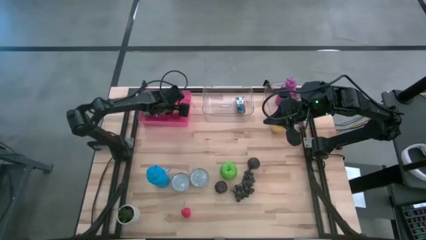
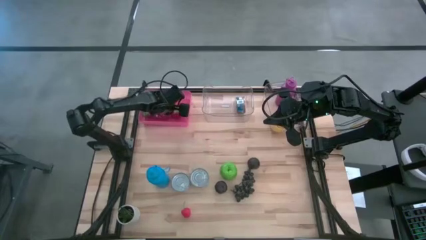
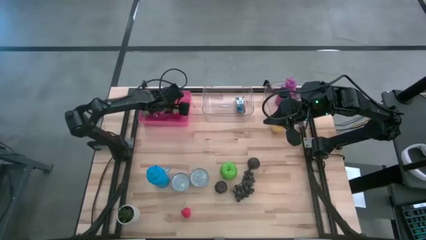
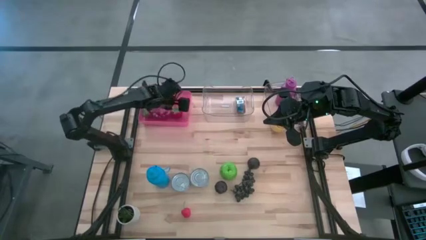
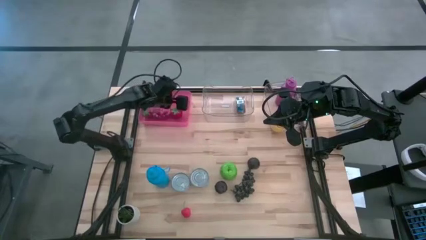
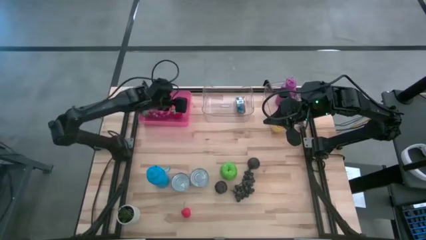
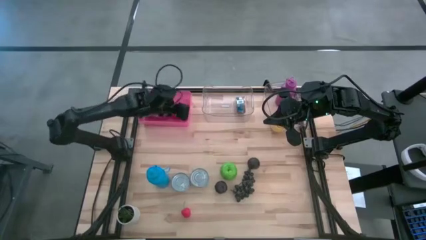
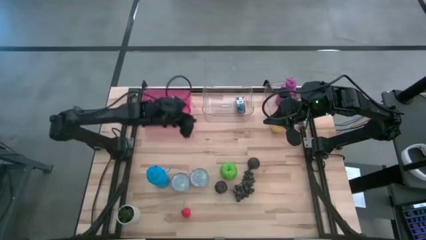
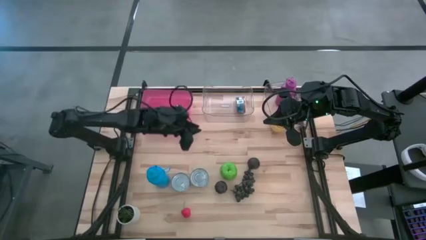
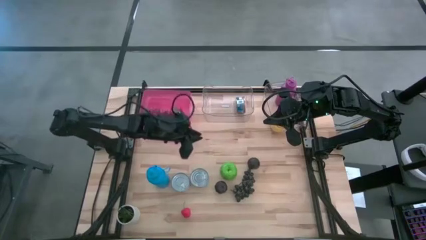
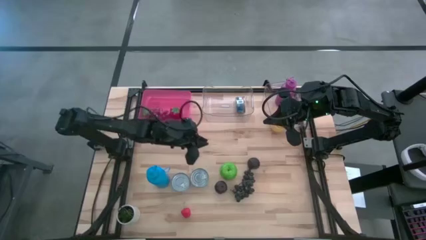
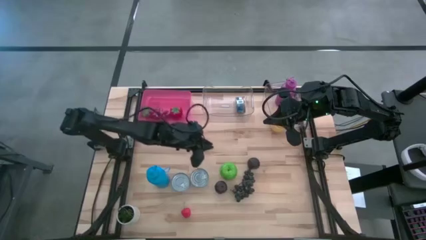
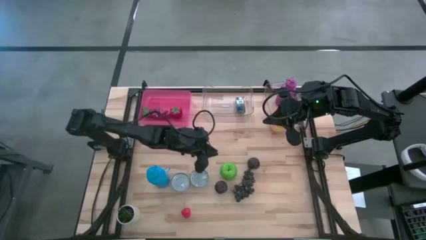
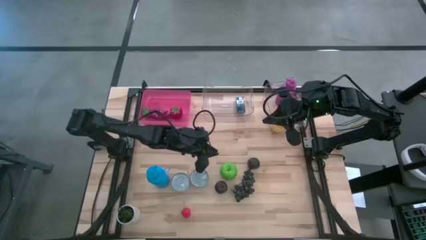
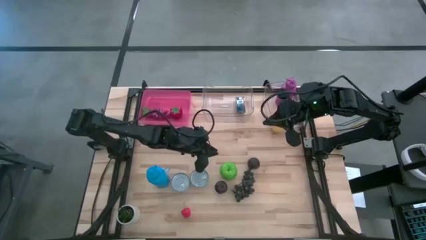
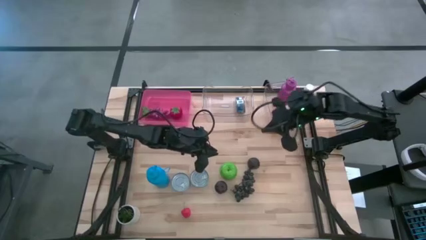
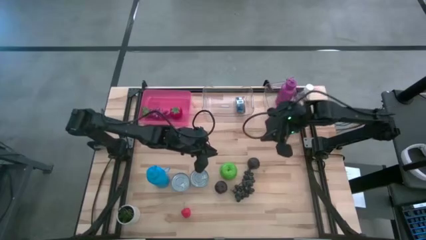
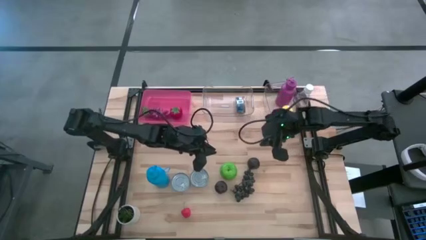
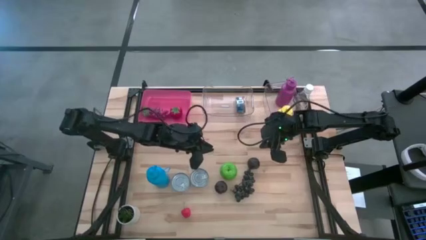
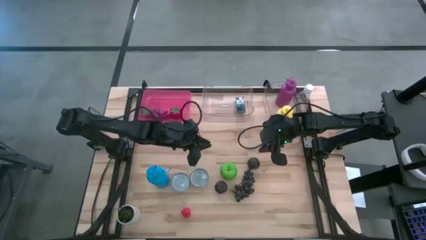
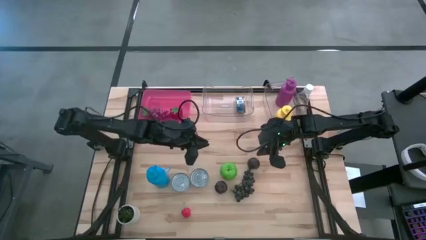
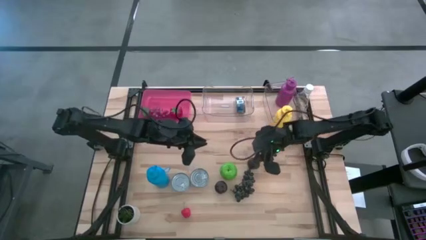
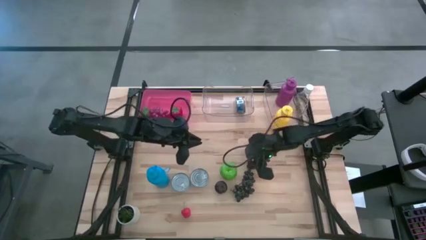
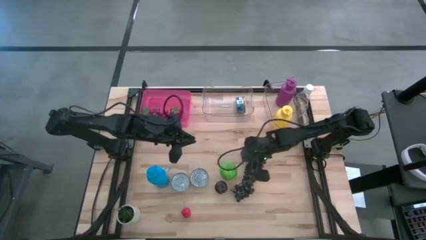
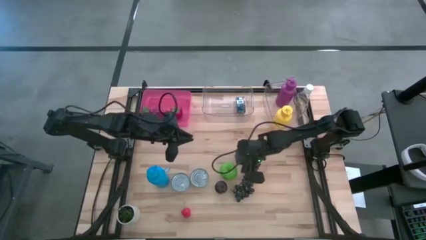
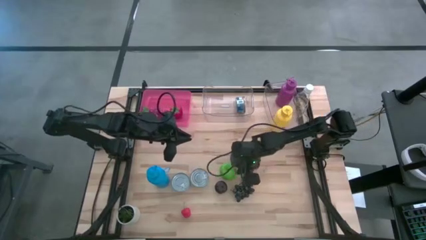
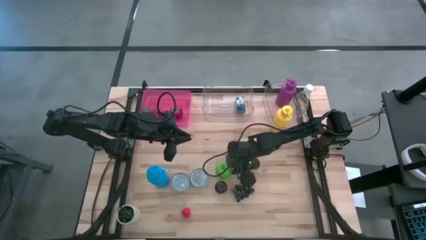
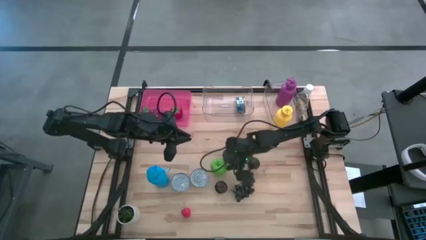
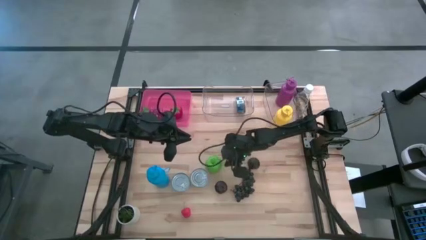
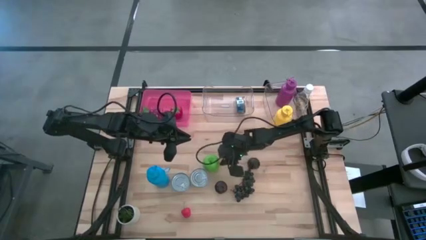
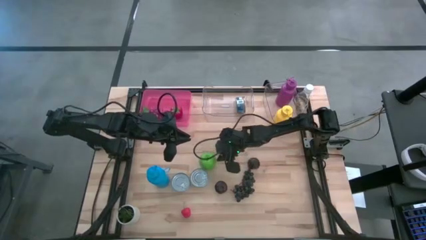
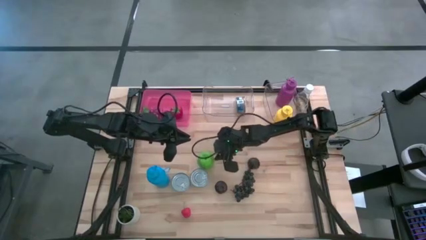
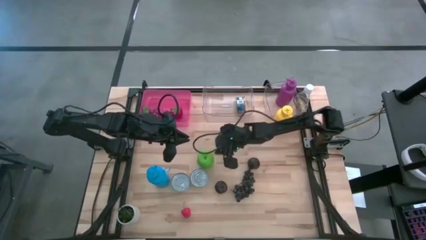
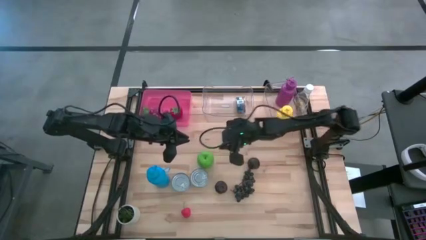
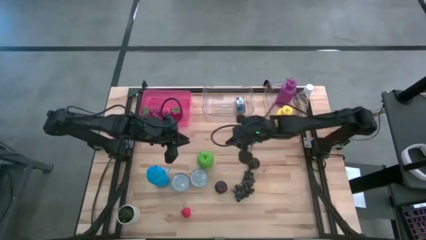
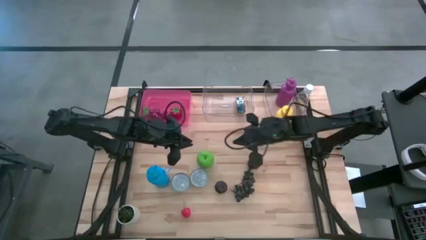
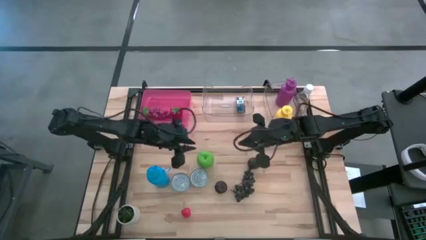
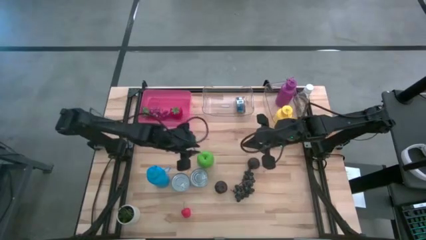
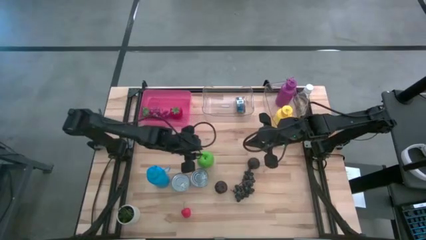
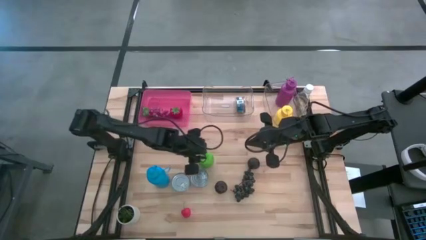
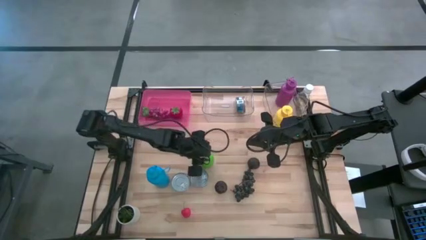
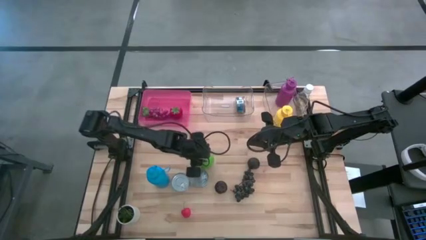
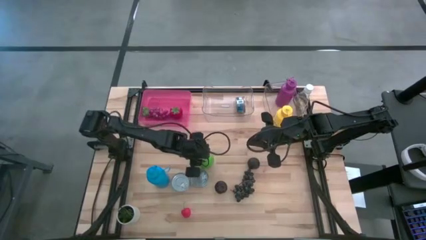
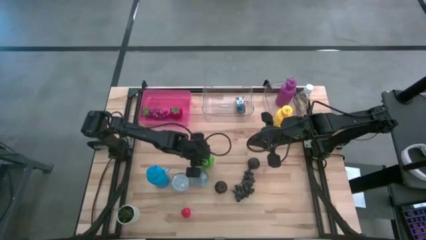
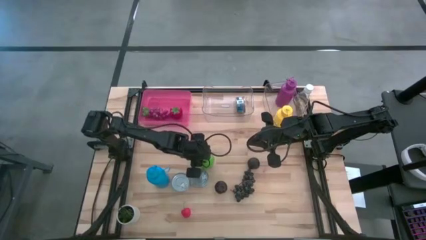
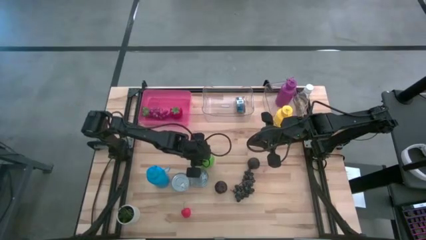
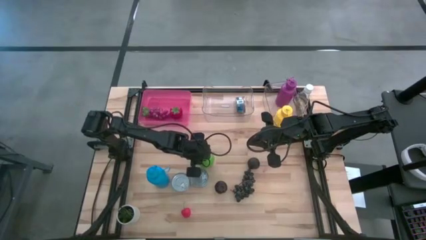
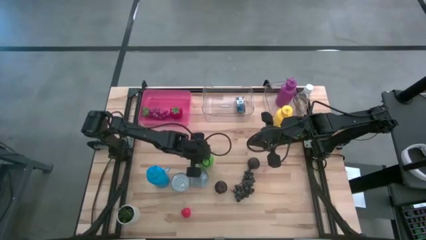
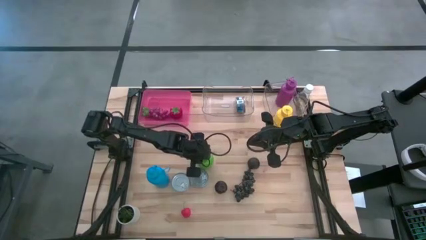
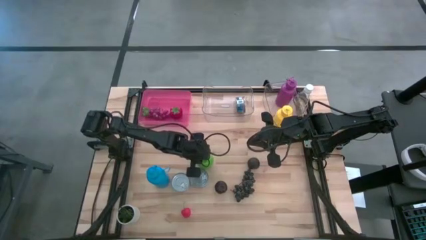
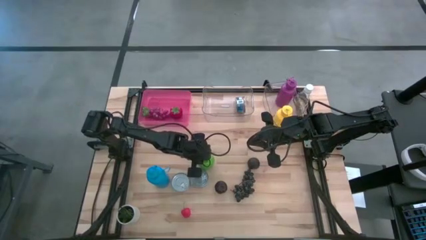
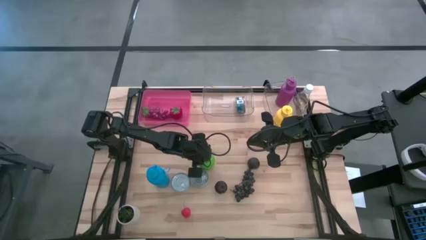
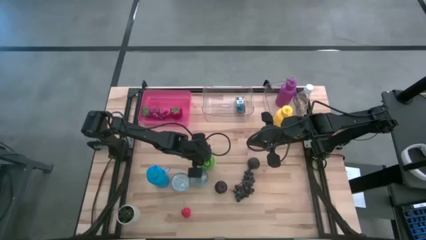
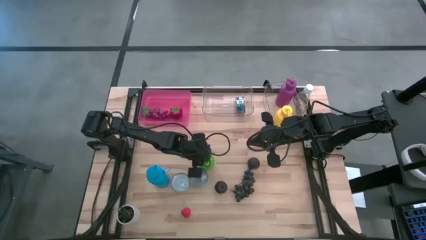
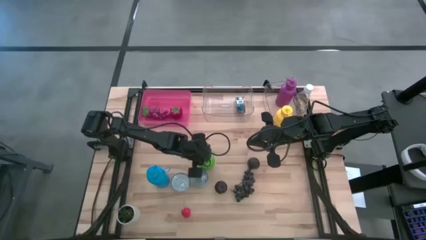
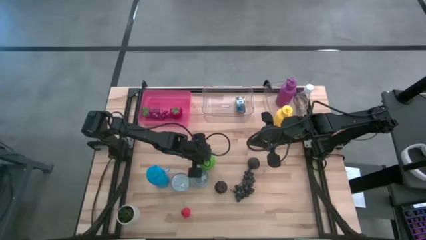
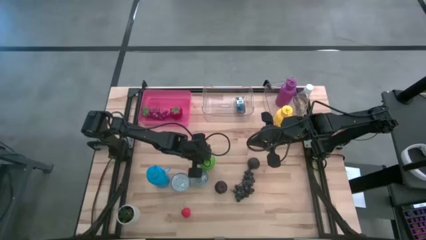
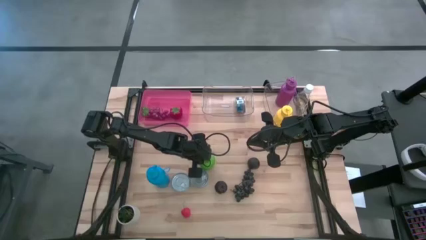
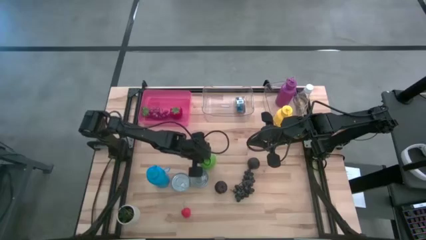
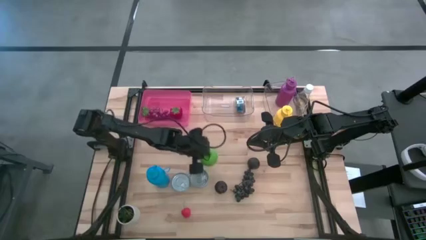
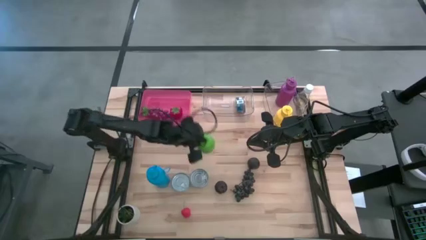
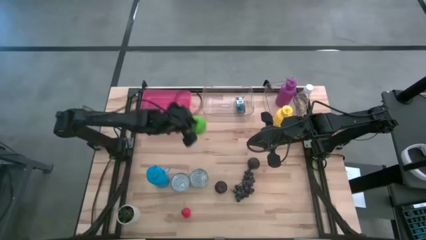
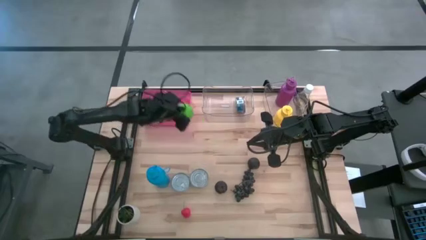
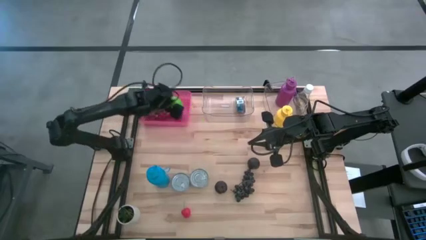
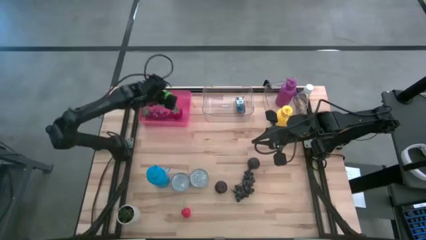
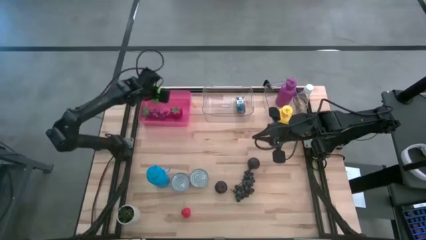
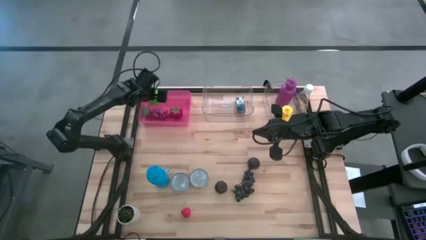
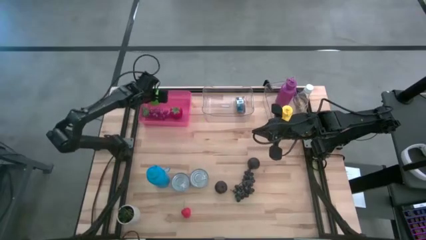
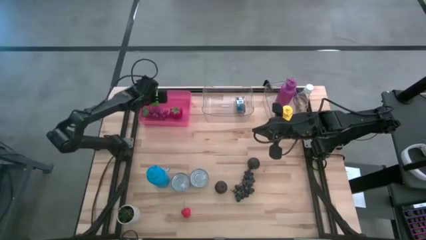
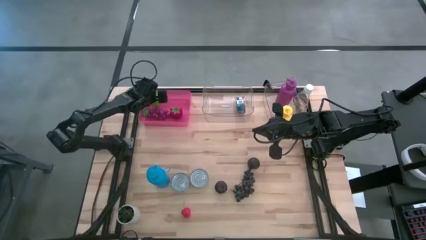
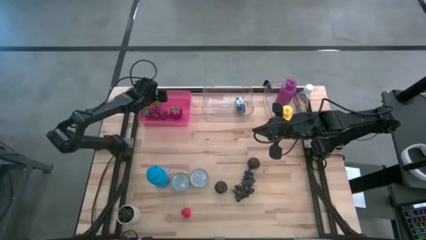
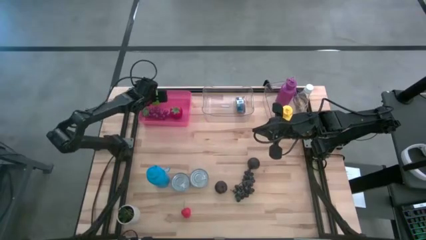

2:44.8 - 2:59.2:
Task: Pick & Place Food Item
Put the green apple into the red transparent bin
